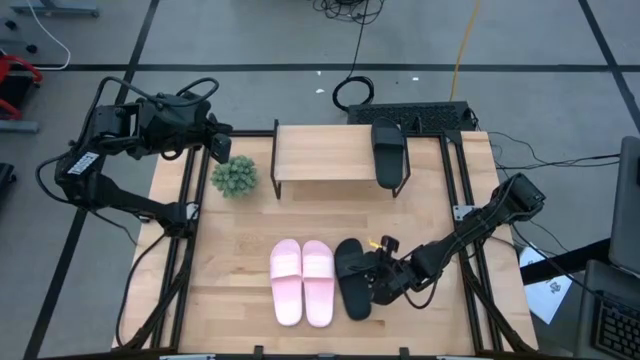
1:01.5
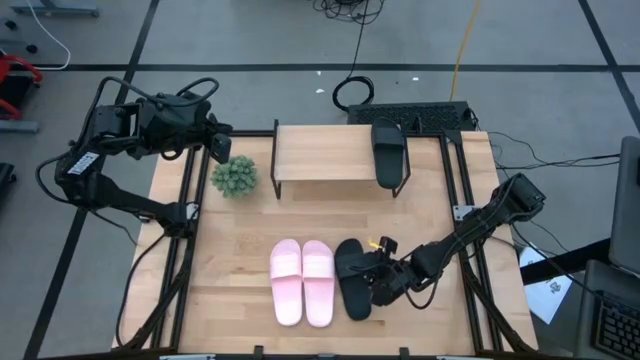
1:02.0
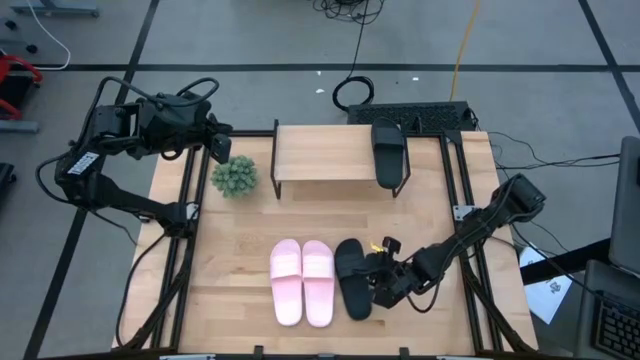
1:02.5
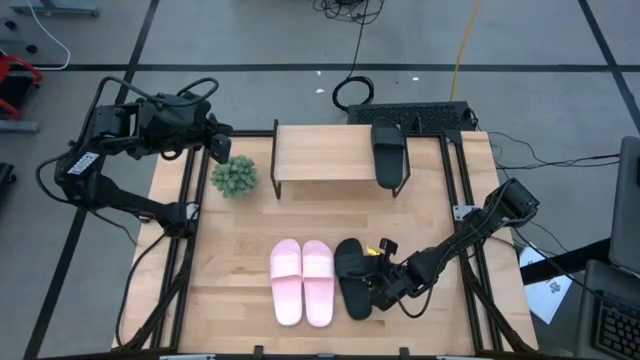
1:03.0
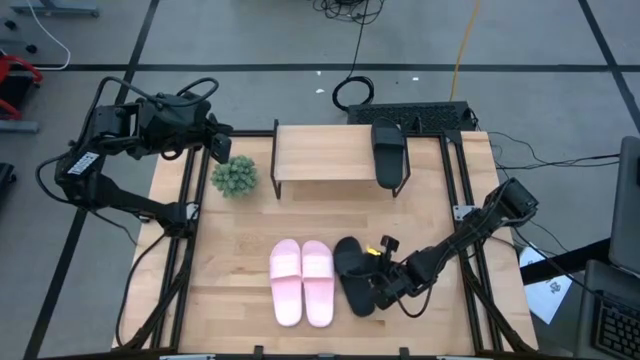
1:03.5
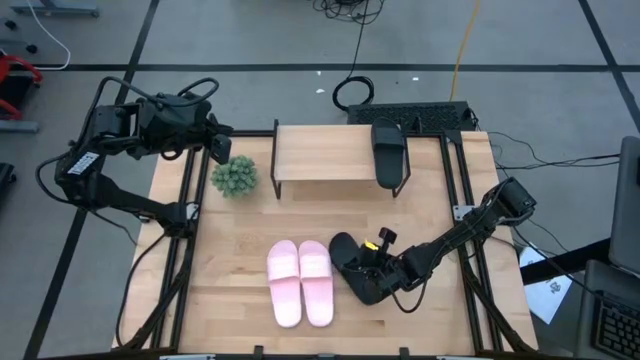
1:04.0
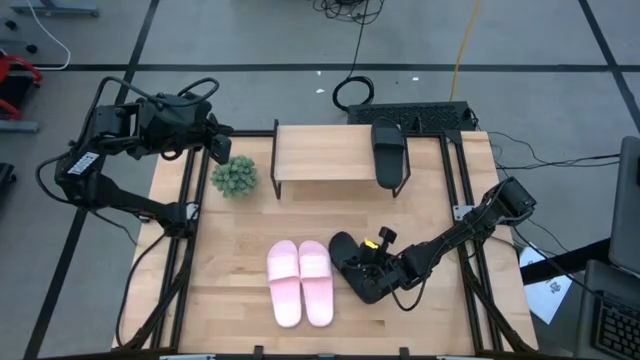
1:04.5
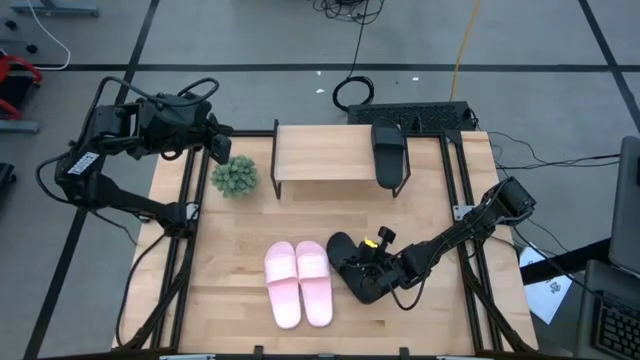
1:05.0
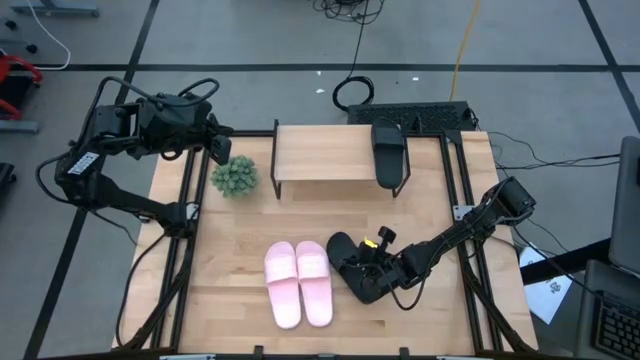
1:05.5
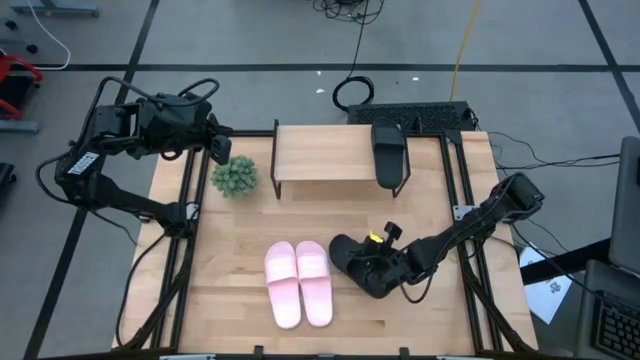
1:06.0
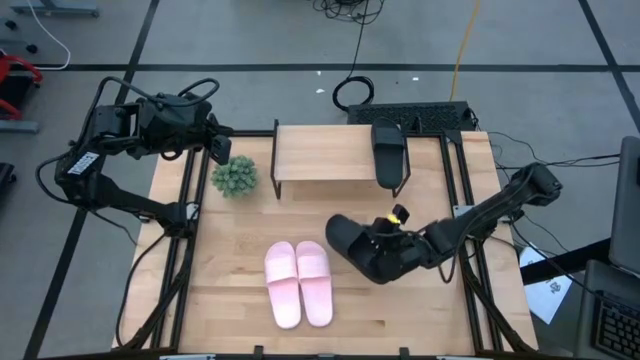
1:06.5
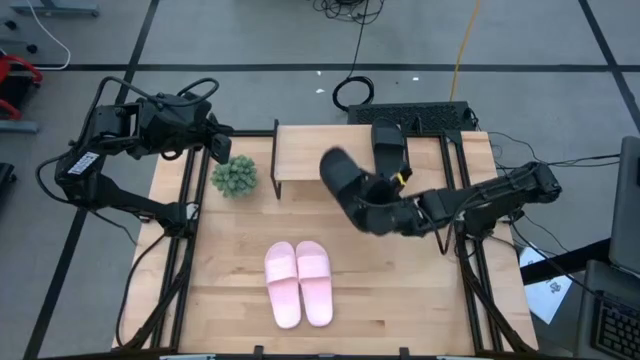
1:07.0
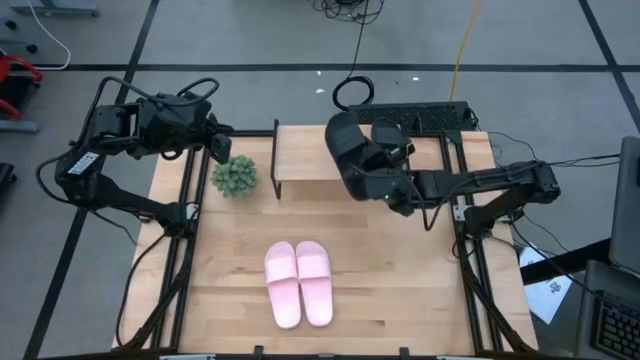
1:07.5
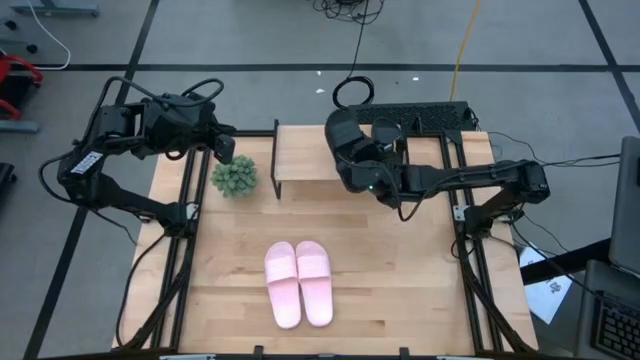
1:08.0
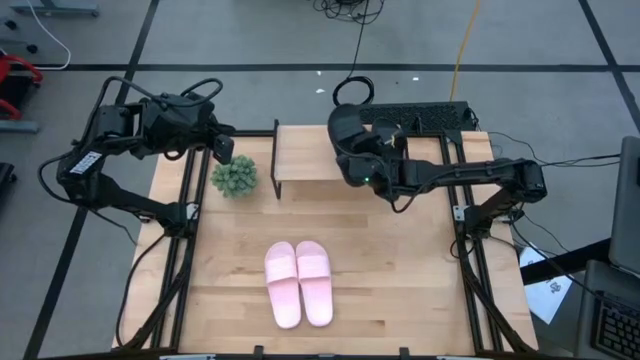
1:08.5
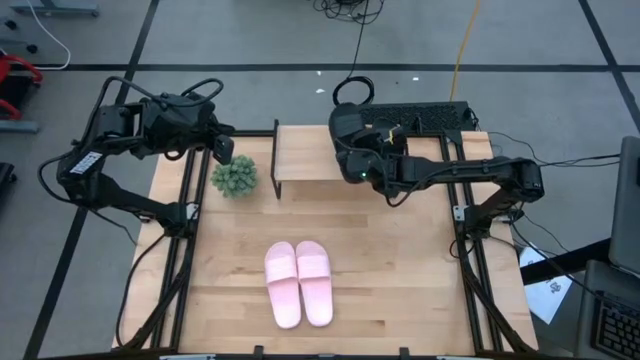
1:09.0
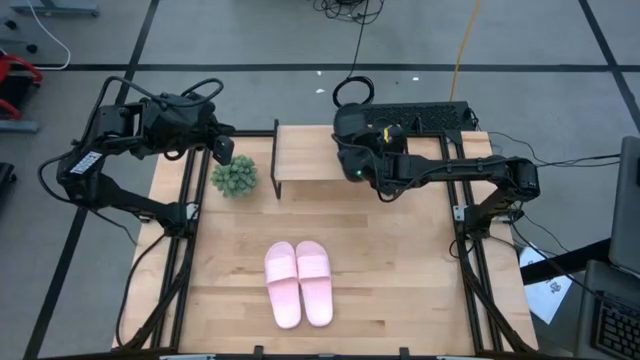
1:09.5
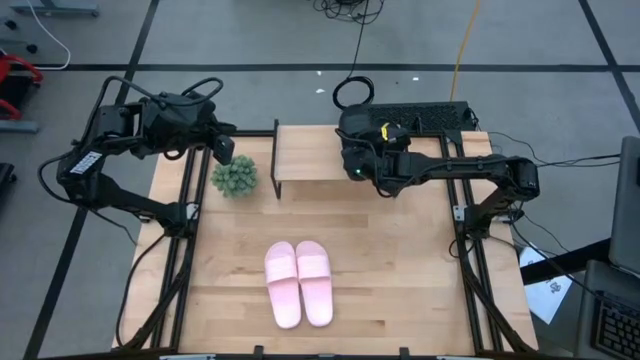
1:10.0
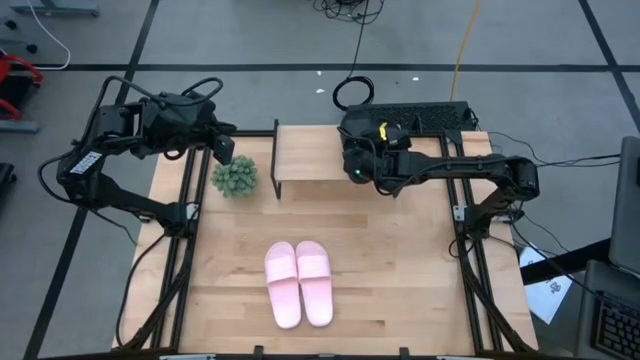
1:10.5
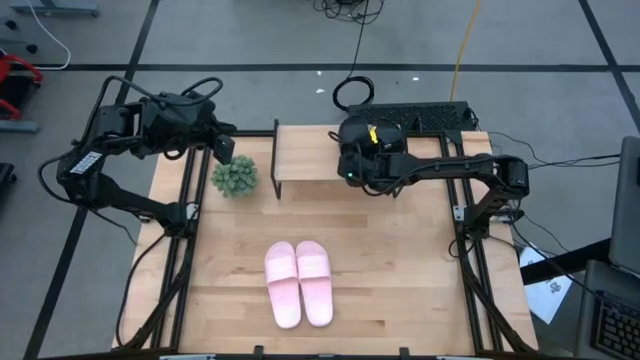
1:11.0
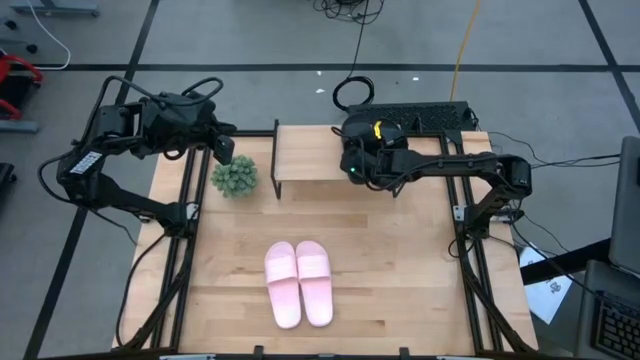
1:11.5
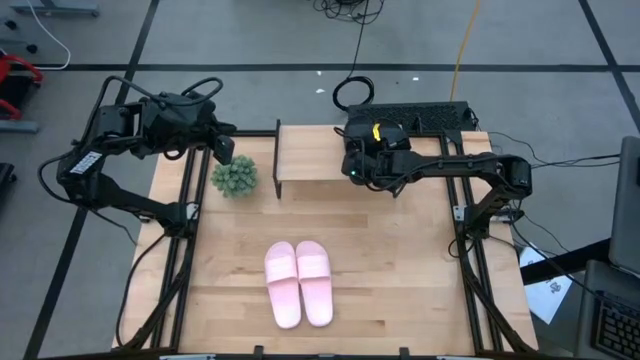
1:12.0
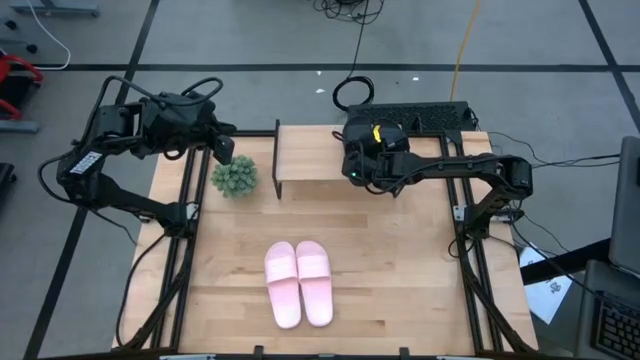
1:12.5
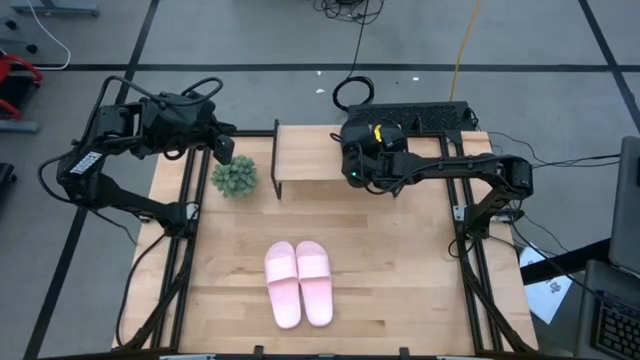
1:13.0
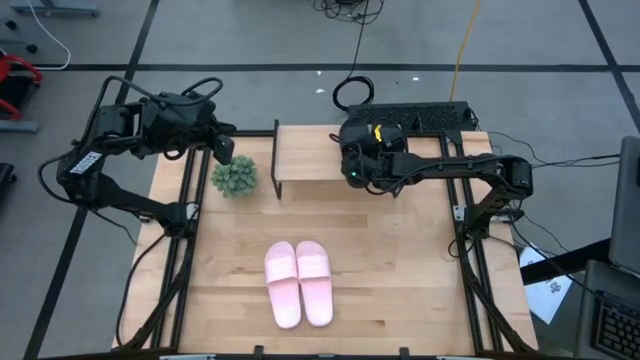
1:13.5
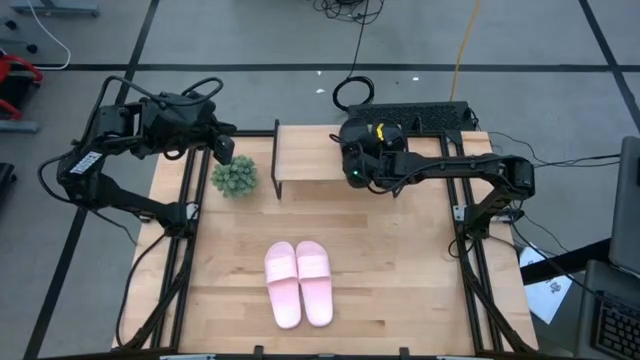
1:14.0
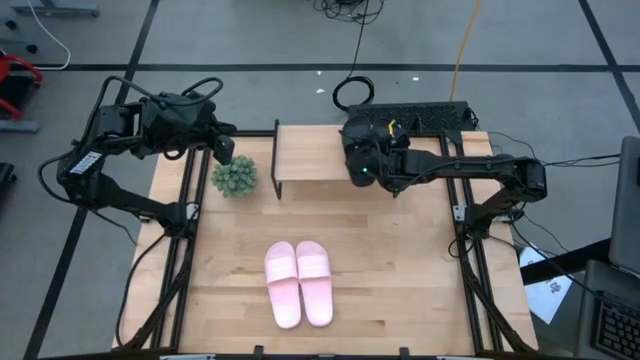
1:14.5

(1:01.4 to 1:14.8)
Task: Pick and place slides into the shelf
Put the black slipper on the shelf

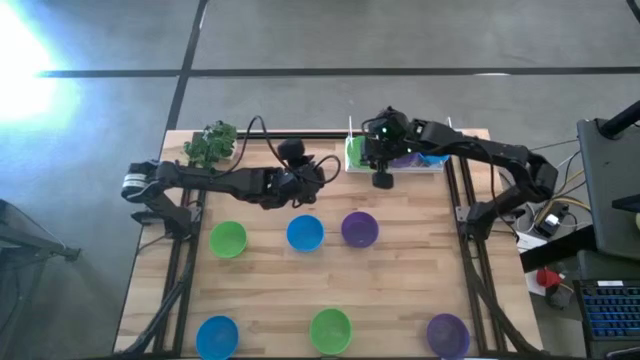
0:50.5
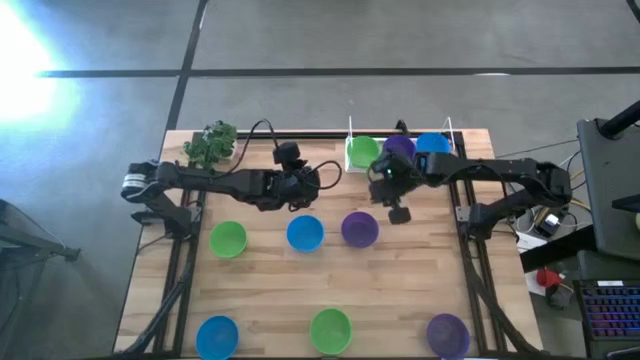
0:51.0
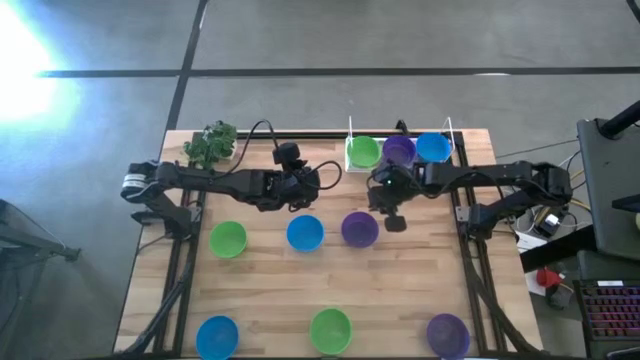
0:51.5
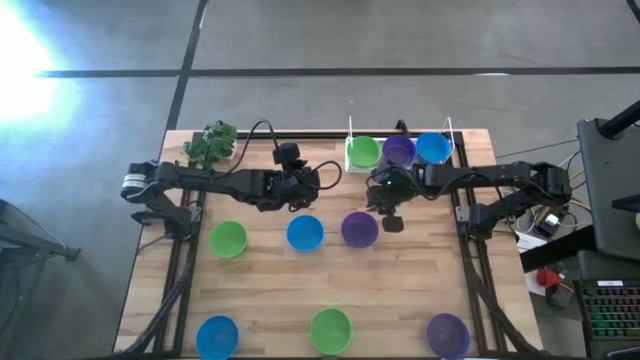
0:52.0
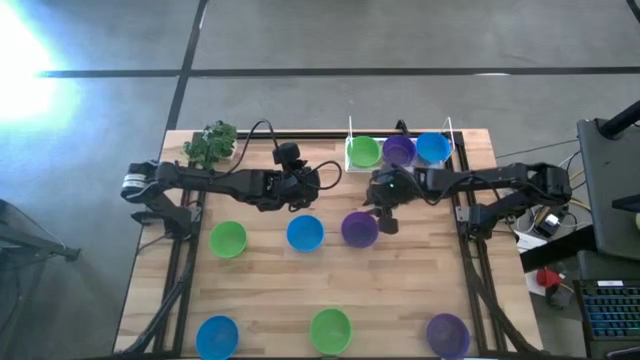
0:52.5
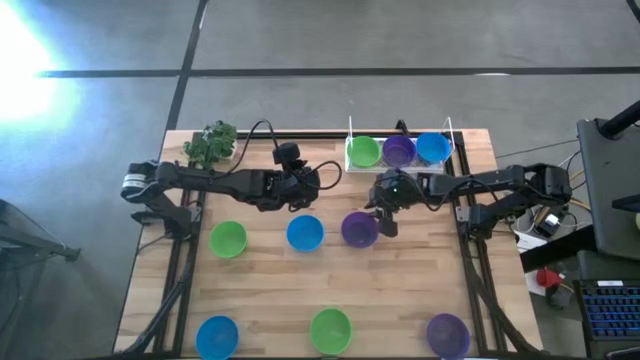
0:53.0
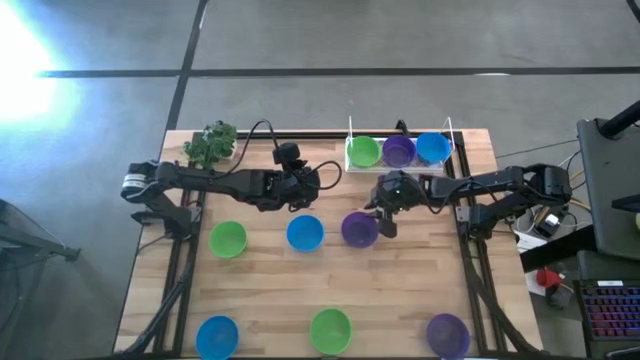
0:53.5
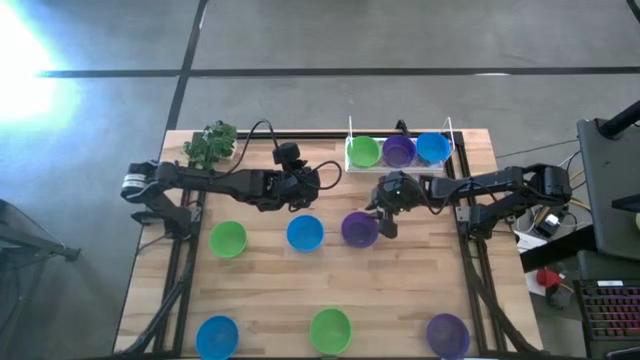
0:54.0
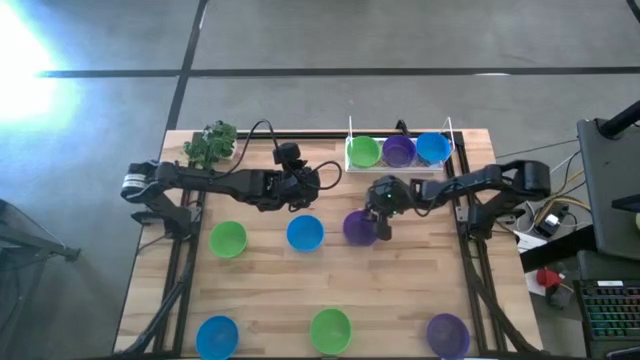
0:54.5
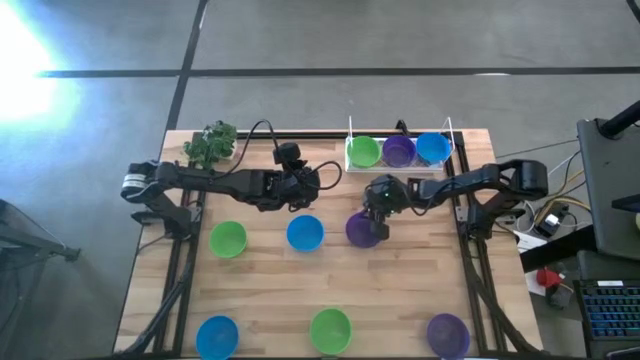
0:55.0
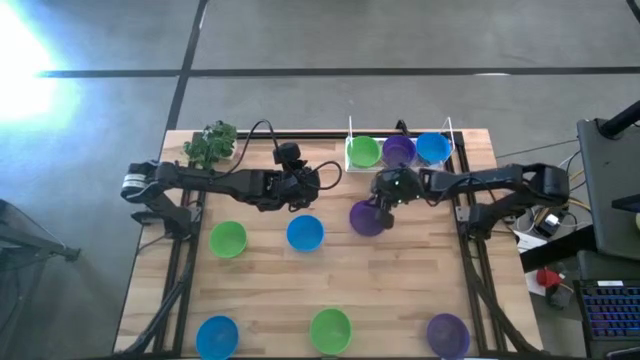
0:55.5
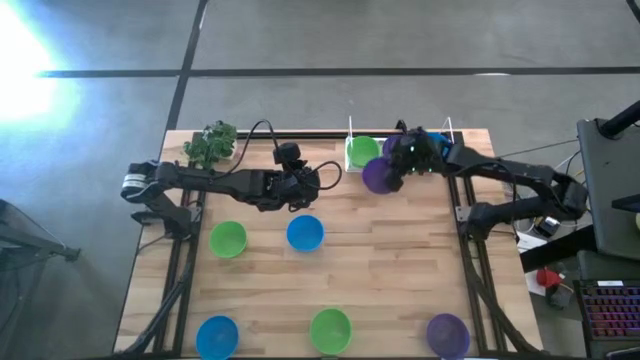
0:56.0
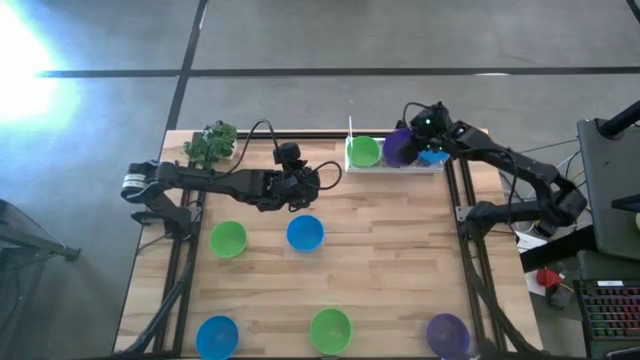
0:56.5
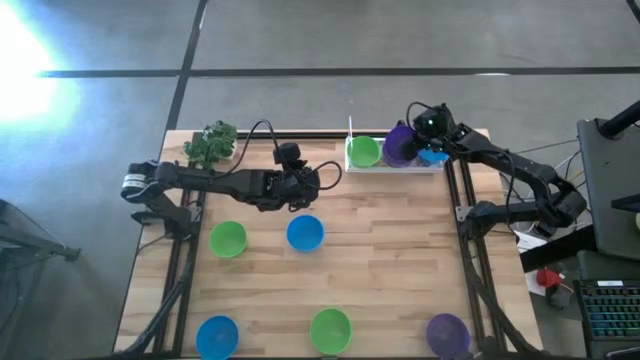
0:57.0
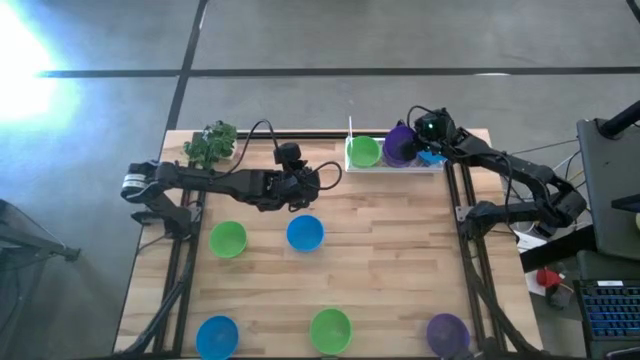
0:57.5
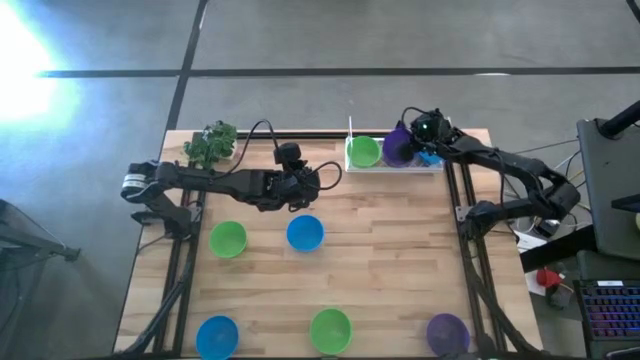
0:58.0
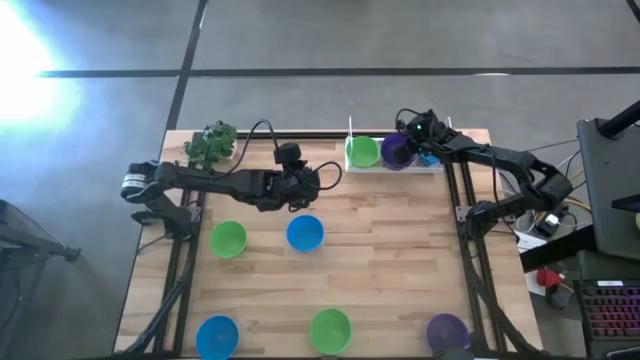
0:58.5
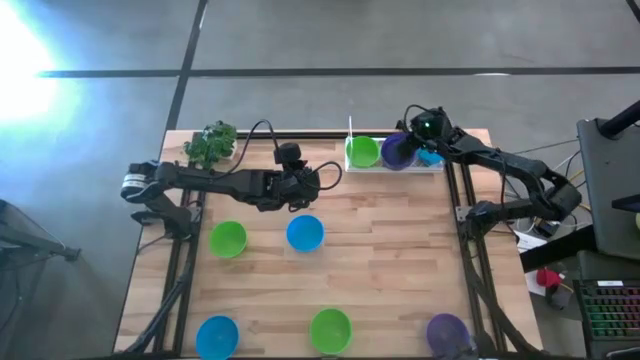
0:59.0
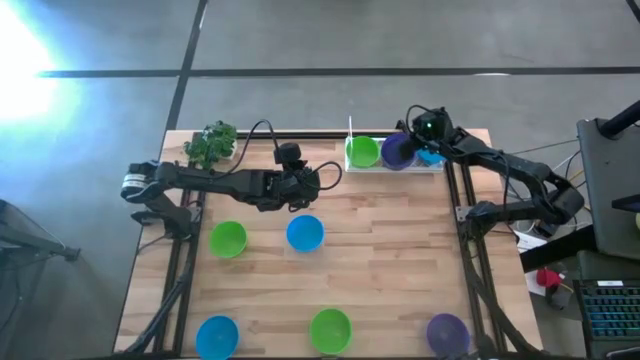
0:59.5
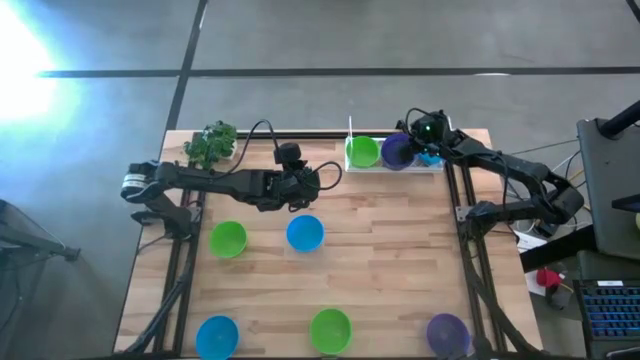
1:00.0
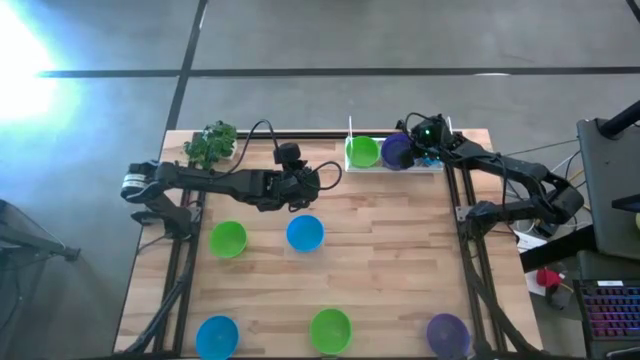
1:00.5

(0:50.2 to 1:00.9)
Task: Pick & Place Mini bowls
Stack the top violet bowl on top of the violet bowl on the shelf
